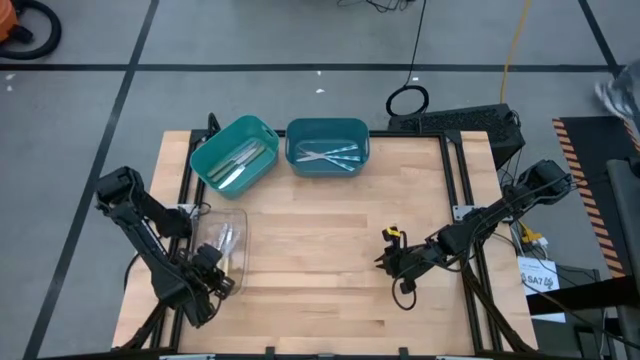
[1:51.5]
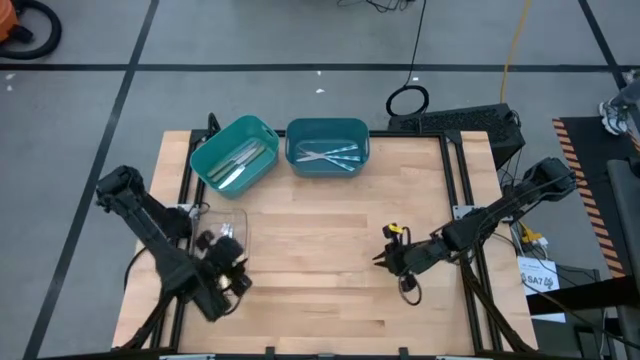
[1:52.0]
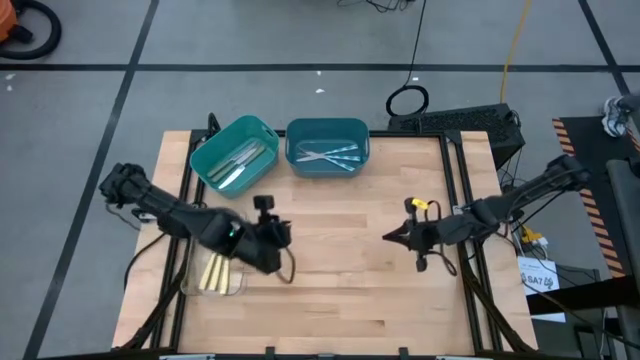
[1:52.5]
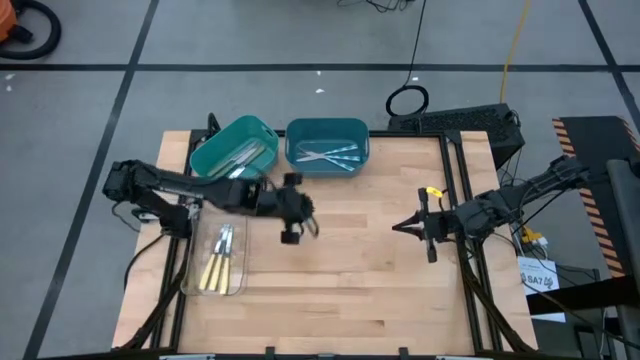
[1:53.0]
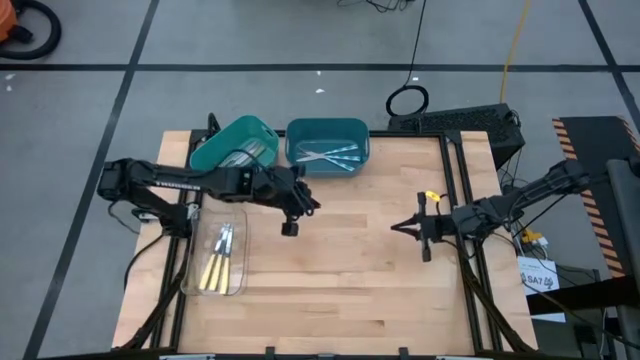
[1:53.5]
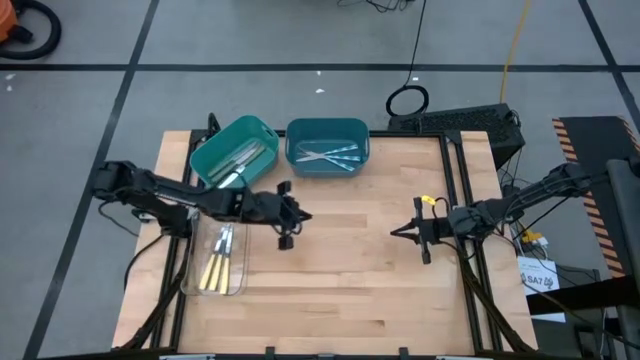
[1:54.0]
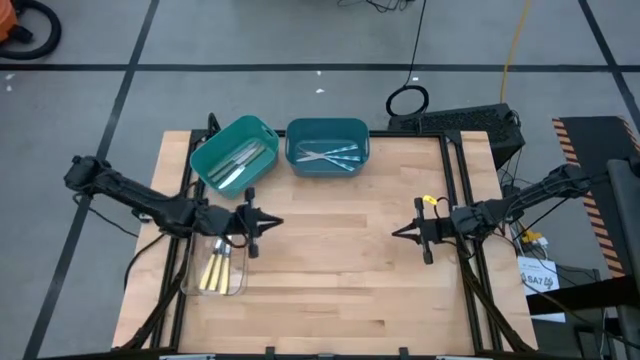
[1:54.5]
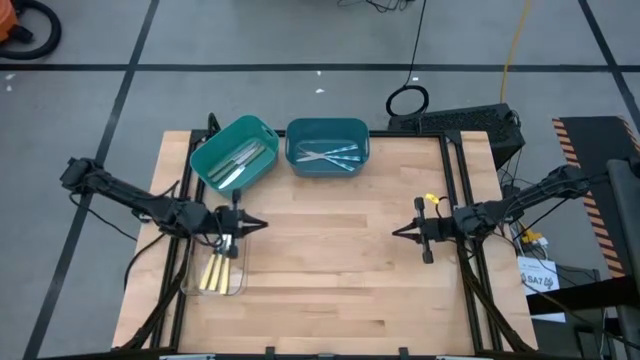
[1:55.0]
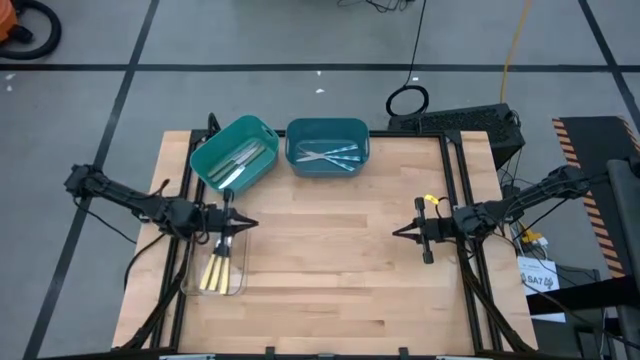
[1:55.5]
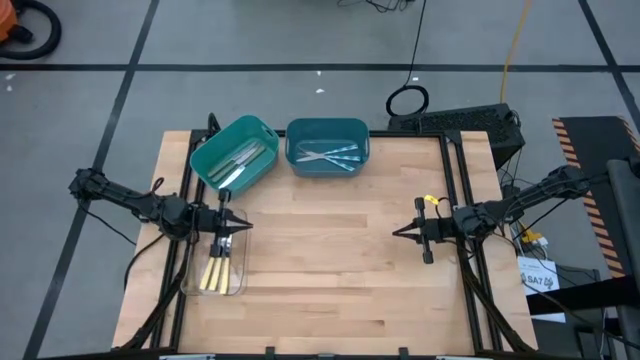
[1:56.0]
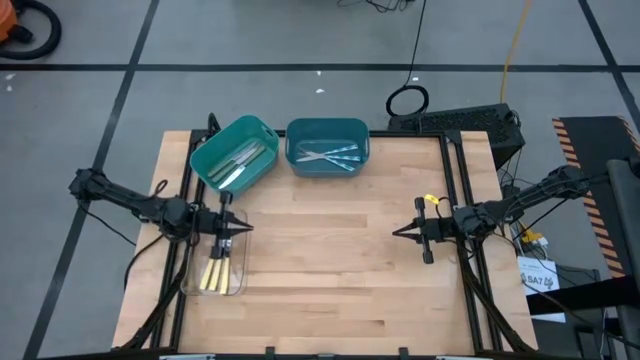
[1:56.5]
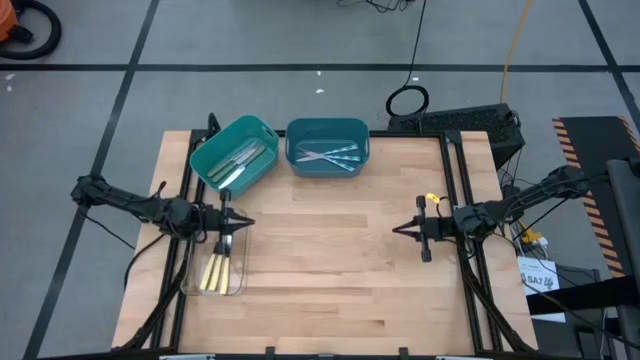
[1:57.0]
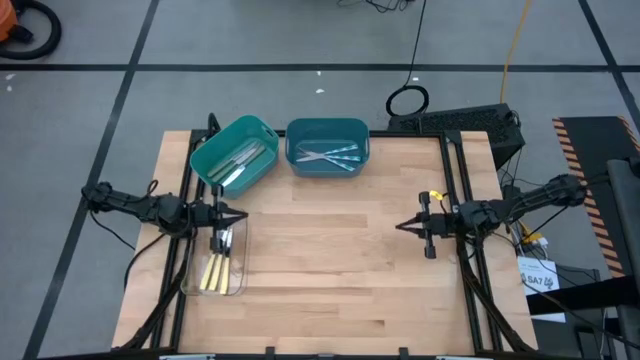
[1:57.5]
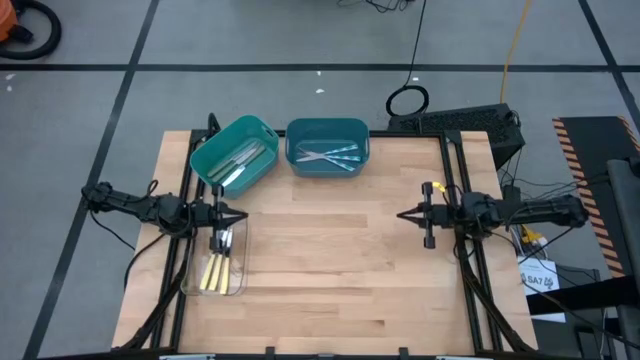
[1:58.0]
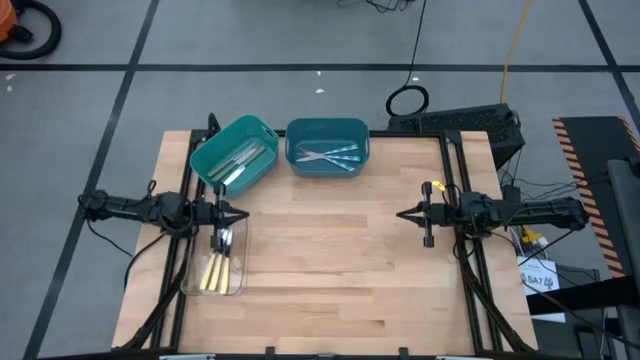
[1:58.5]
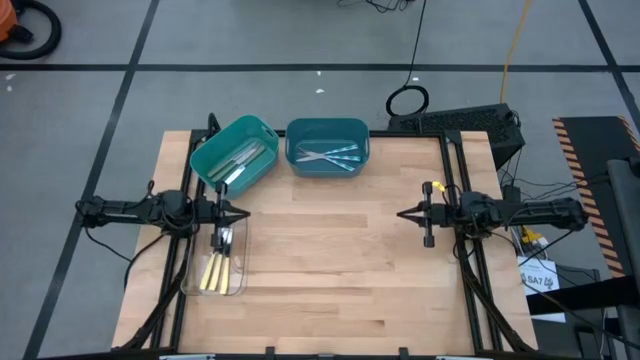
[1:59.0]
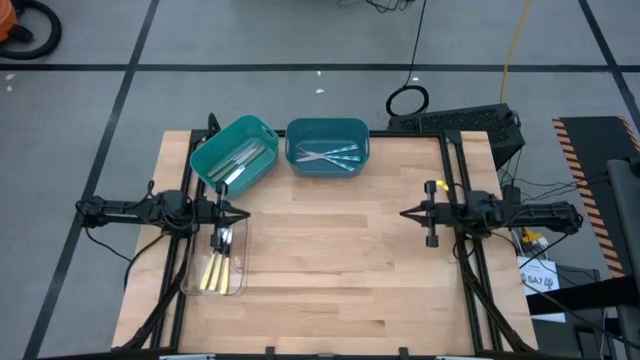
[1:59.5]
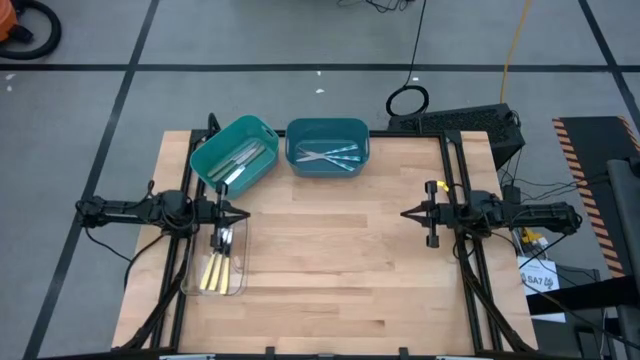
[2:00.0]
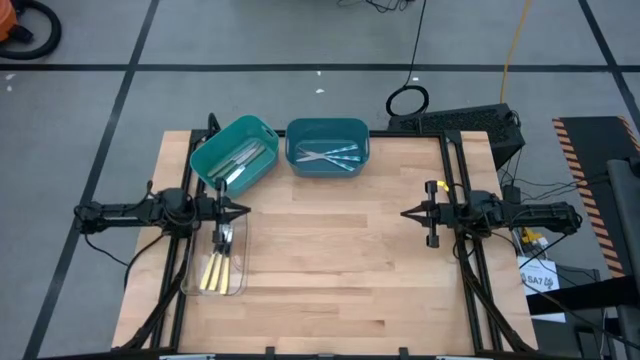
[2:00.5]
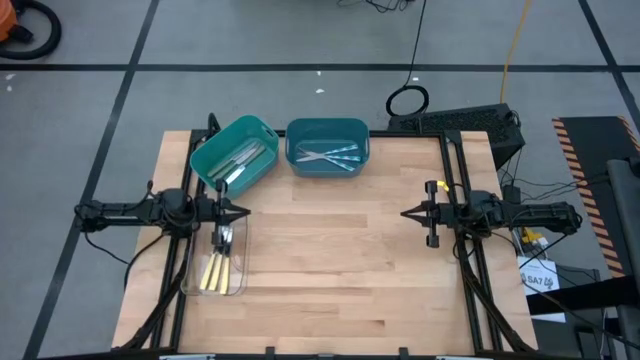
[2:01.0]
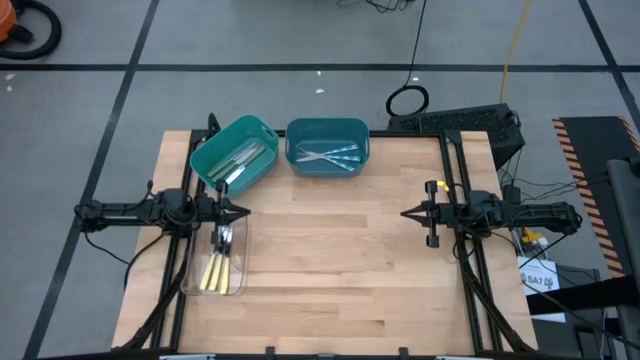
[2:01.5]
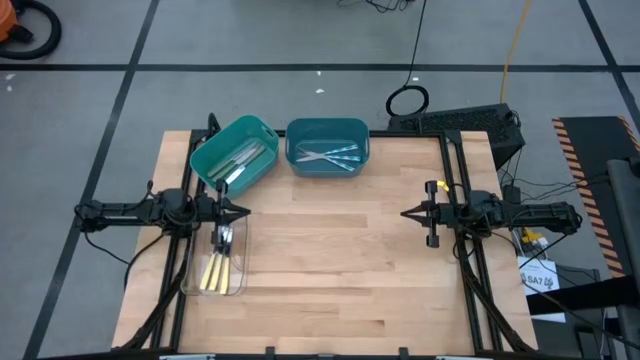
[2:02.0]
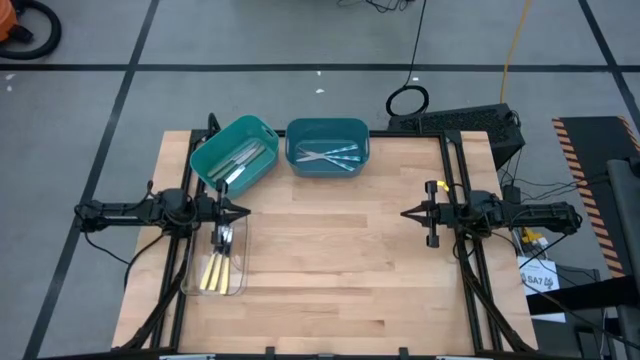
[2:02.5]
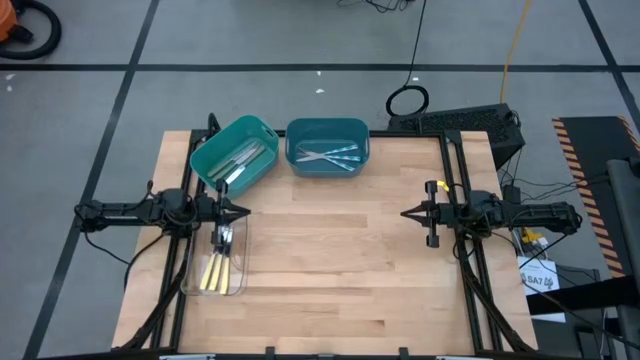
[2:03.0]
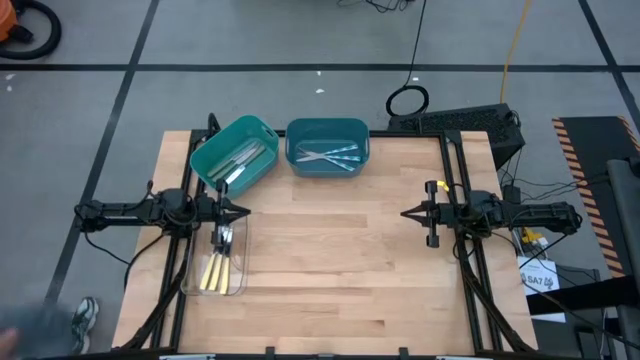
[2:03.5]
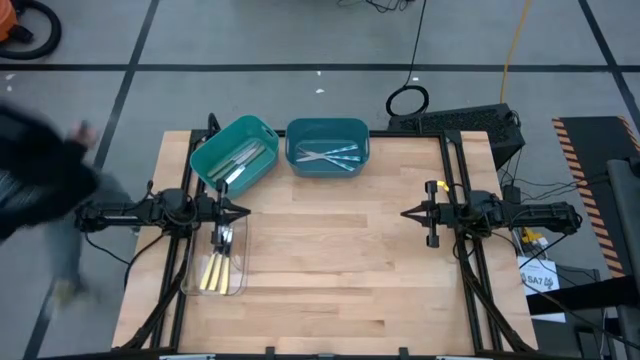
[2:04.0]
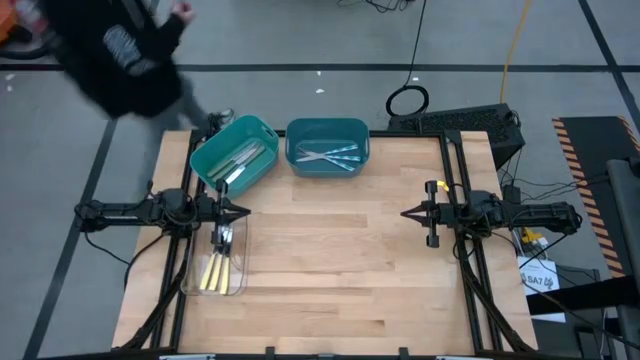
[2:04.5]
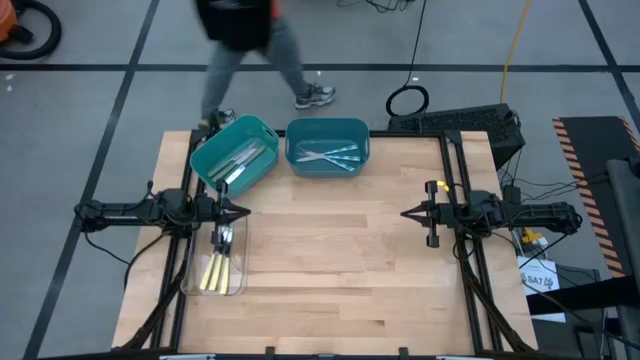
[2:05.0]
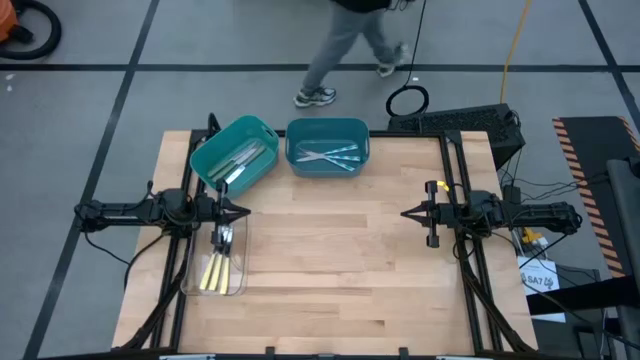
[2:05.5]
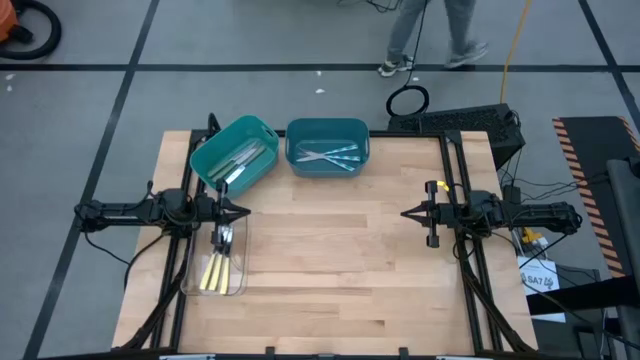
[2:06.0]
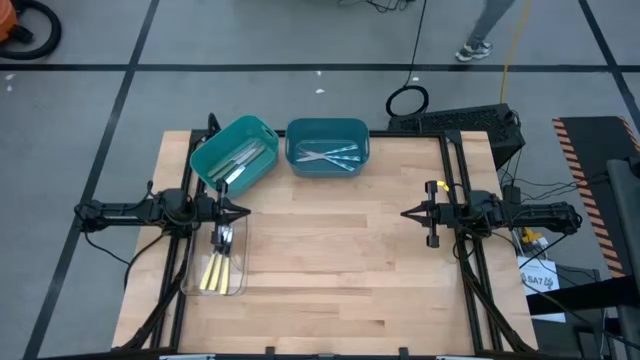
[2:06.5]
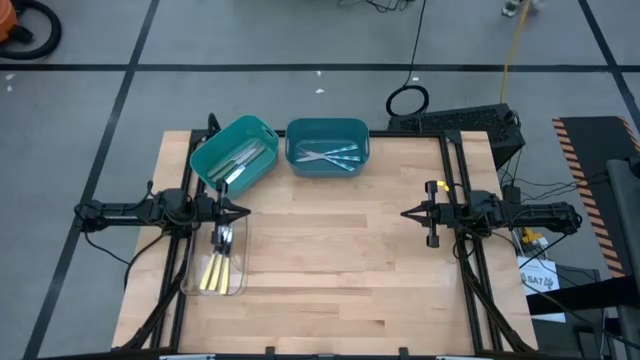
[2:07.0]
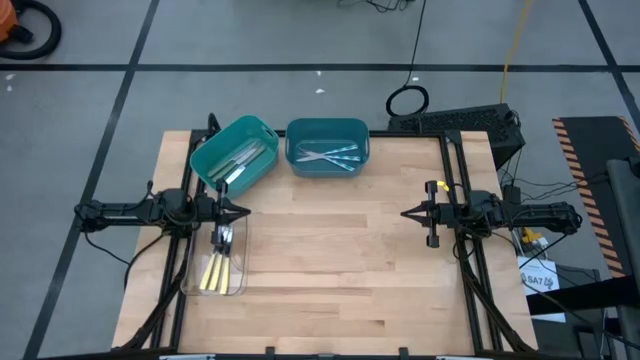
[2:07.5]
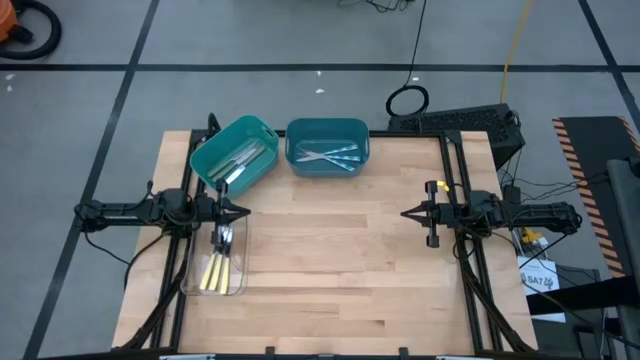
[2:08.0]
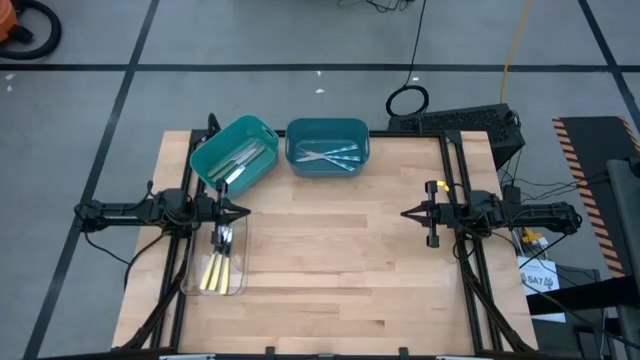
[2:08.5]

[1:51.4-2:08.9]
Task: Sort silverware by color (type)
Return to Home Position

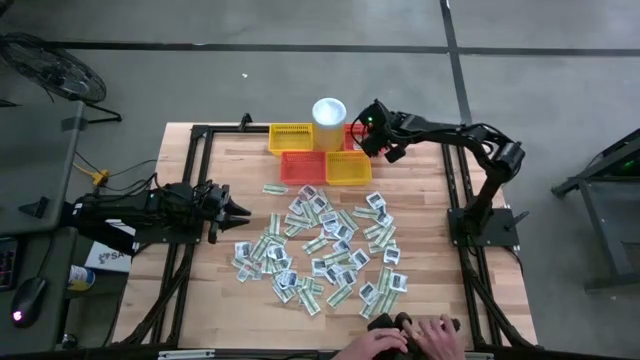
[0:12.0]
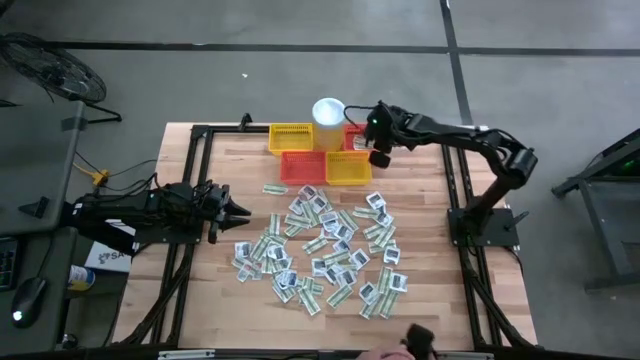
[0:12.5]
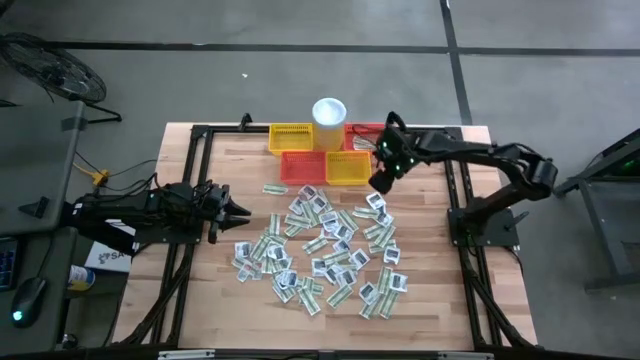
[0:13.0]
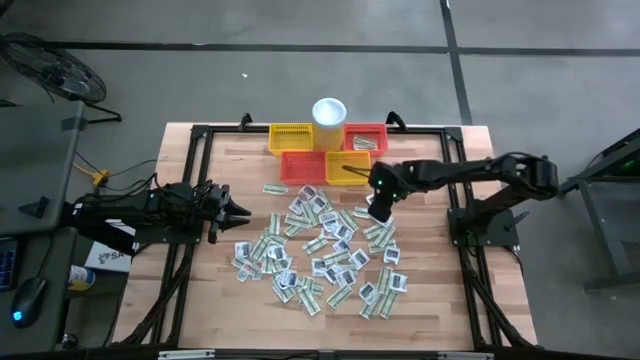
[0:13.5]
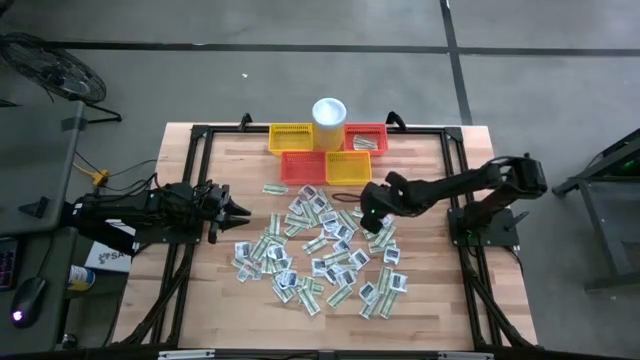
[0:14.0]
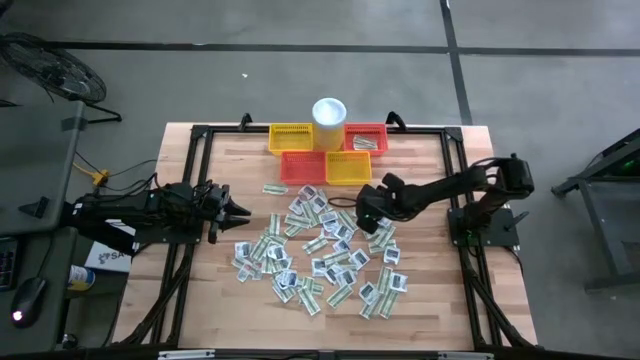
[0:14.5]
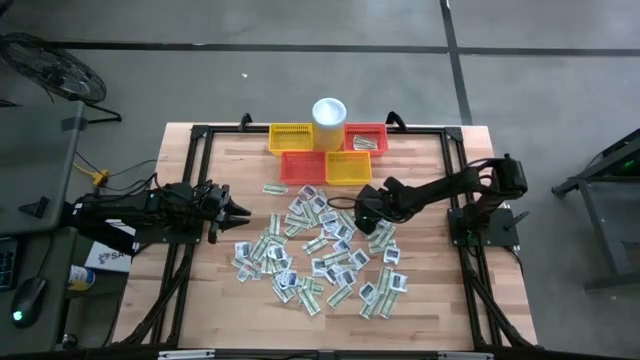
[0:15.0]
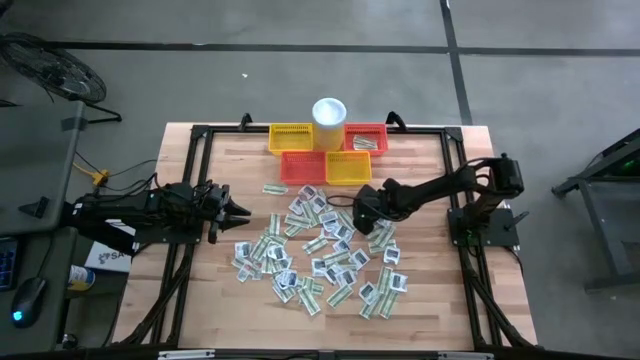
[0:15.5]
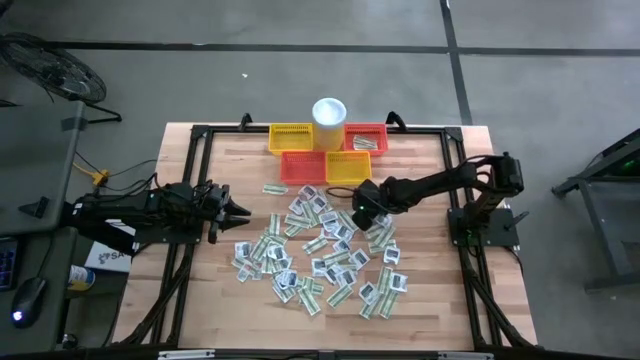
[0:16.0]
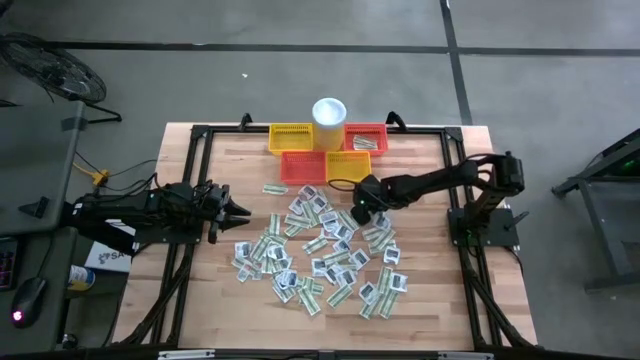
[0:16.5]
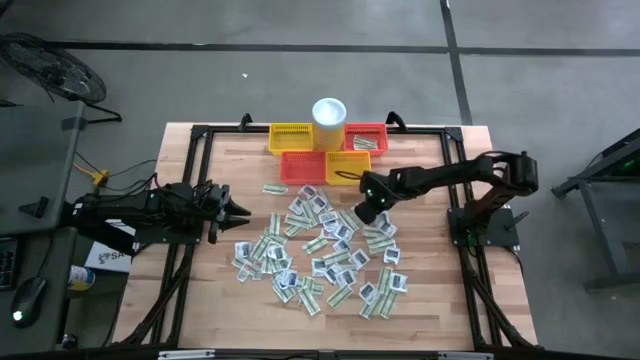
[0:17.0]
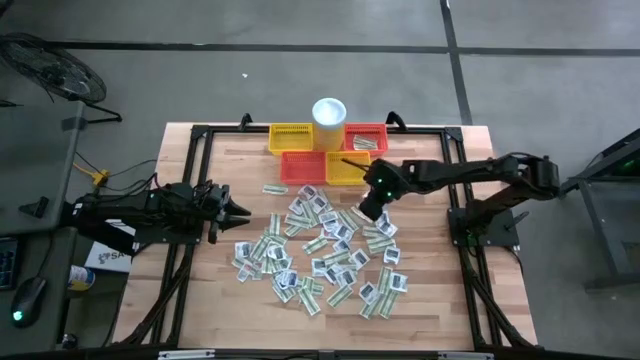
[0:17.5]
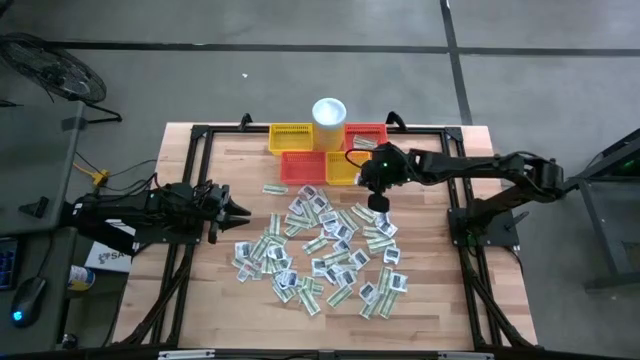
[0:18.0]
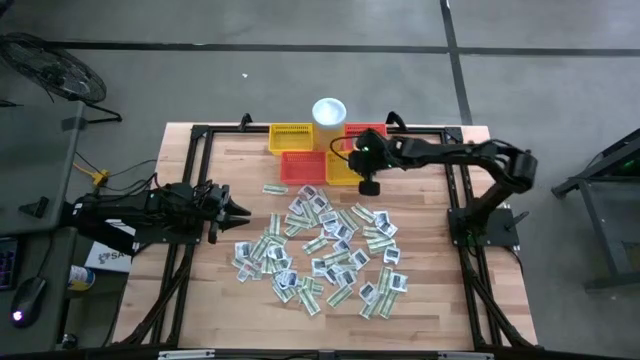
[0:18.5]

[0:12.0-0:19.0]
Task: Pick & Place First Aid Supplies
Put the black towelette pack into the bottom yellow basket
